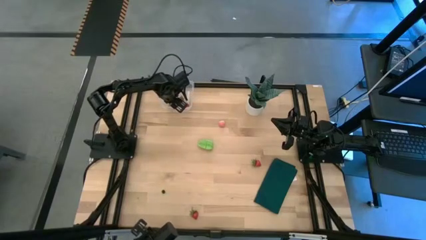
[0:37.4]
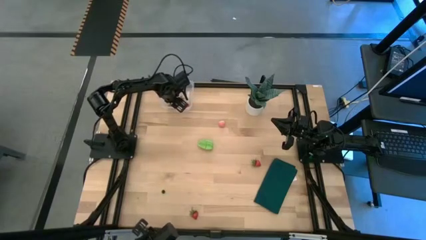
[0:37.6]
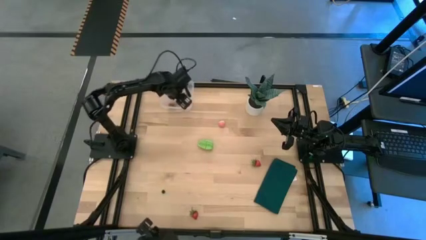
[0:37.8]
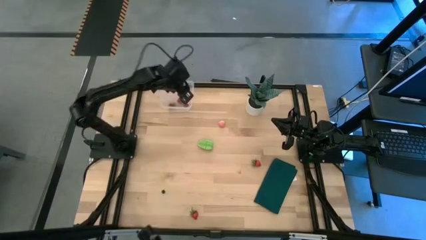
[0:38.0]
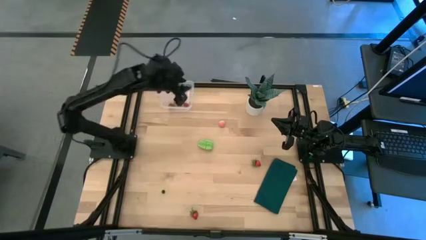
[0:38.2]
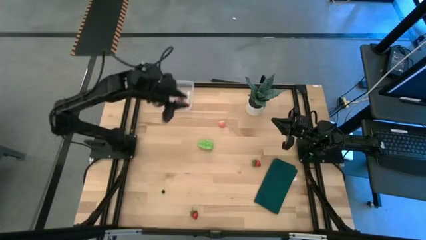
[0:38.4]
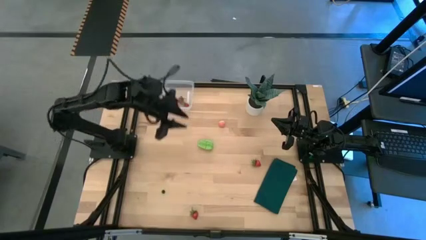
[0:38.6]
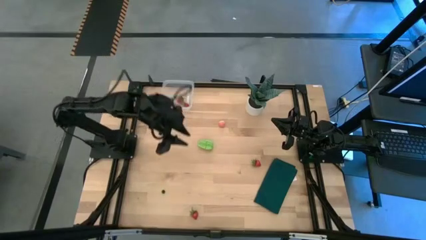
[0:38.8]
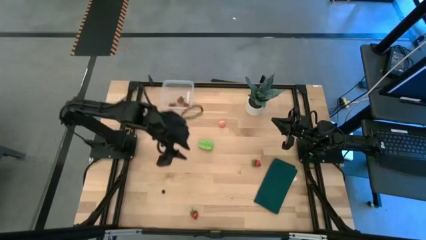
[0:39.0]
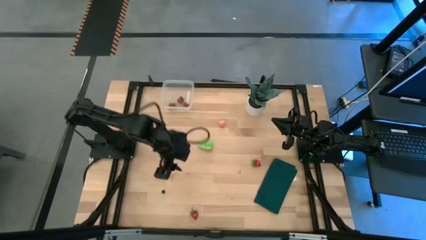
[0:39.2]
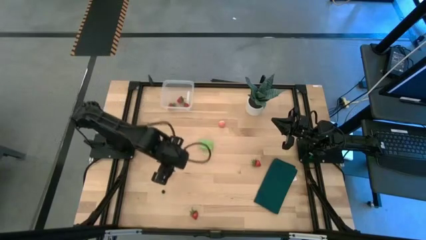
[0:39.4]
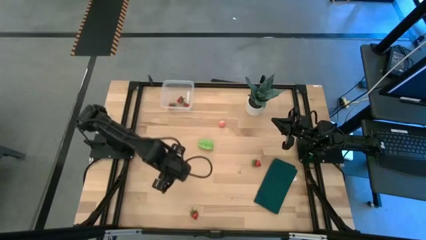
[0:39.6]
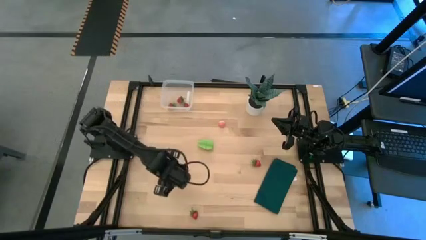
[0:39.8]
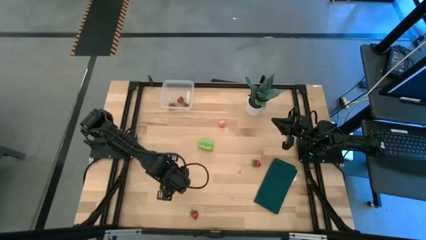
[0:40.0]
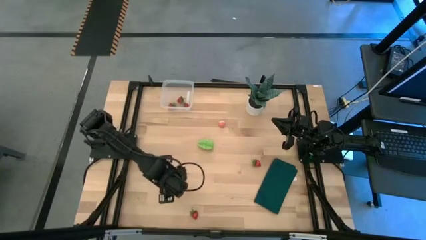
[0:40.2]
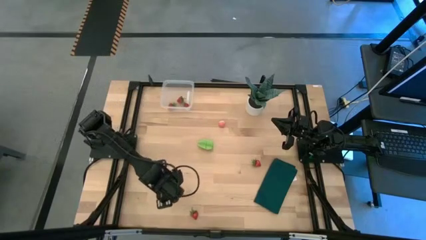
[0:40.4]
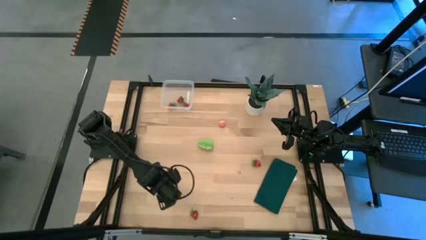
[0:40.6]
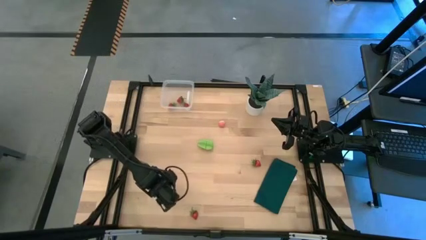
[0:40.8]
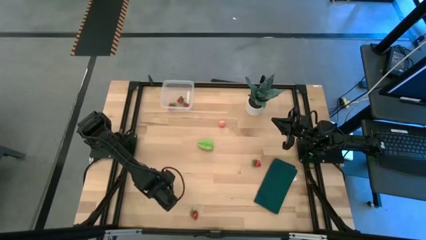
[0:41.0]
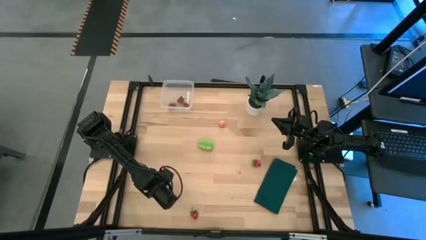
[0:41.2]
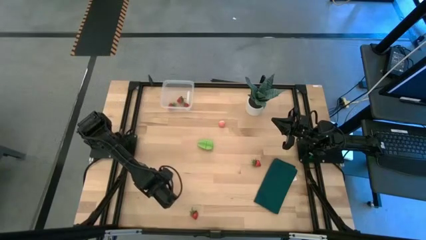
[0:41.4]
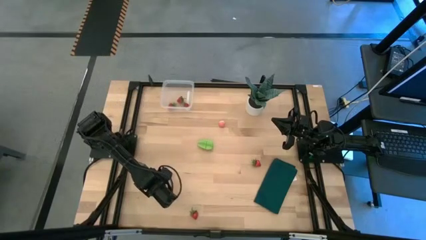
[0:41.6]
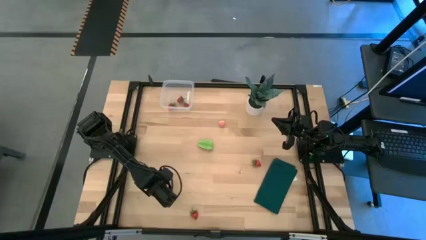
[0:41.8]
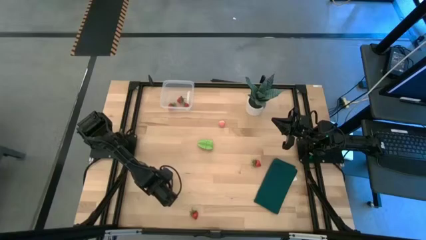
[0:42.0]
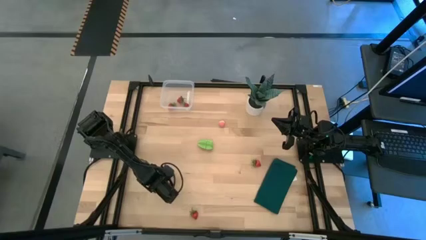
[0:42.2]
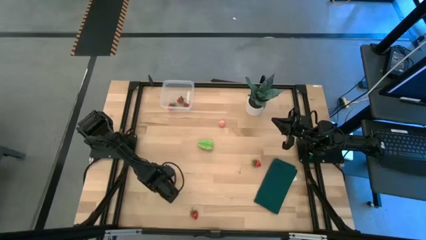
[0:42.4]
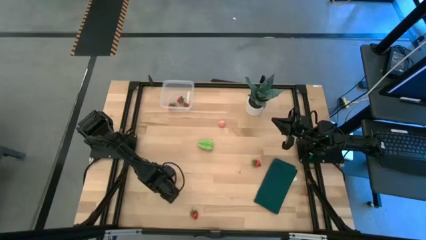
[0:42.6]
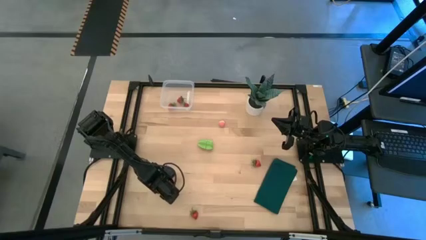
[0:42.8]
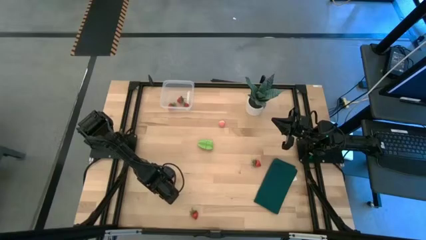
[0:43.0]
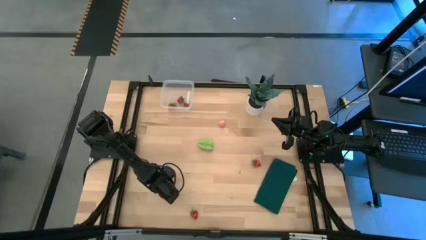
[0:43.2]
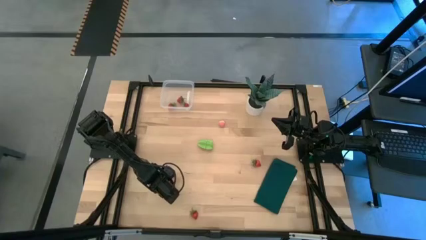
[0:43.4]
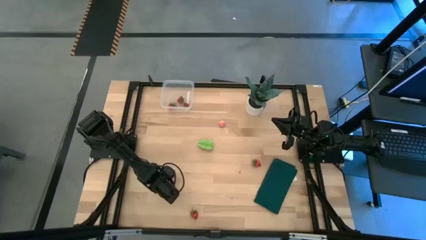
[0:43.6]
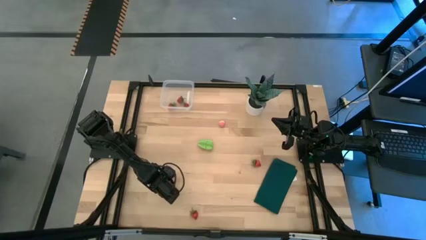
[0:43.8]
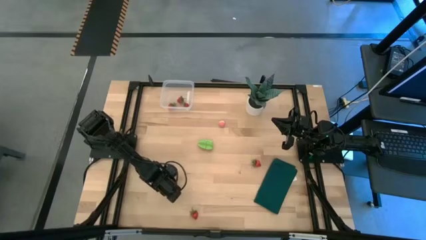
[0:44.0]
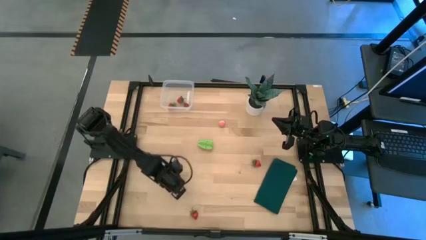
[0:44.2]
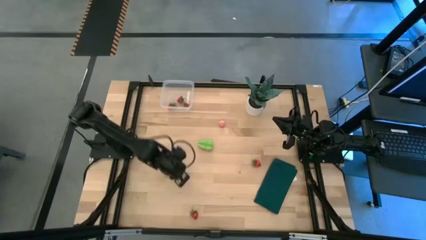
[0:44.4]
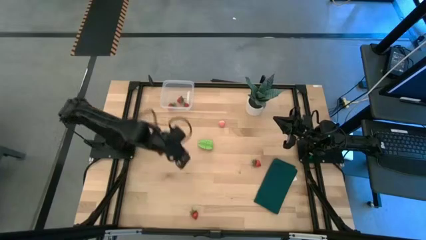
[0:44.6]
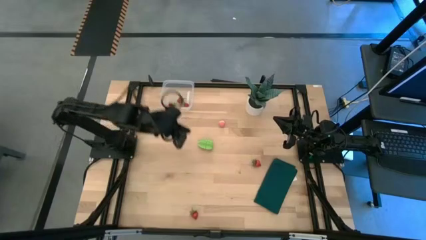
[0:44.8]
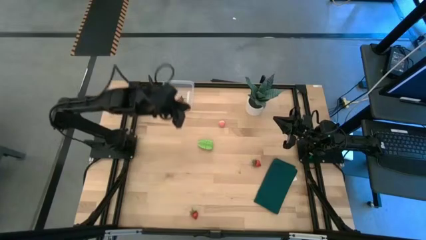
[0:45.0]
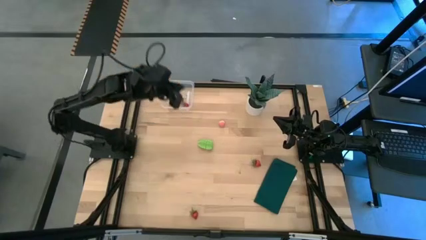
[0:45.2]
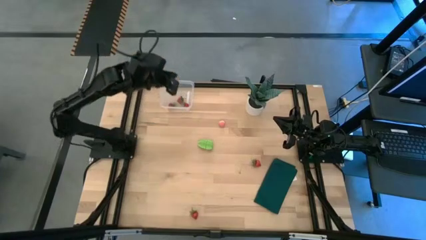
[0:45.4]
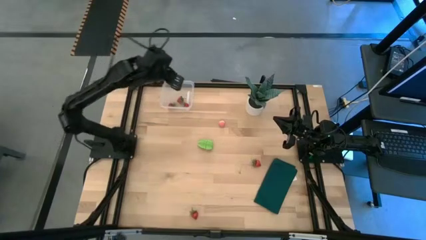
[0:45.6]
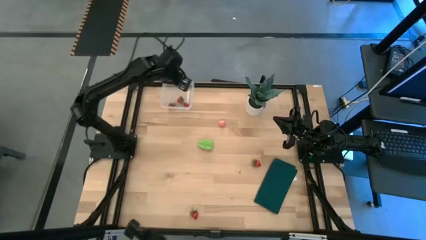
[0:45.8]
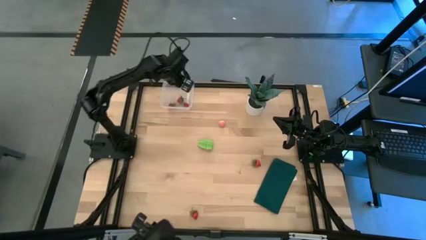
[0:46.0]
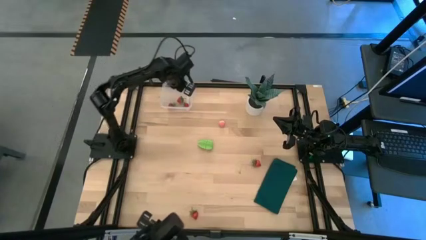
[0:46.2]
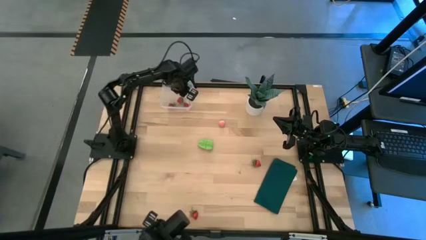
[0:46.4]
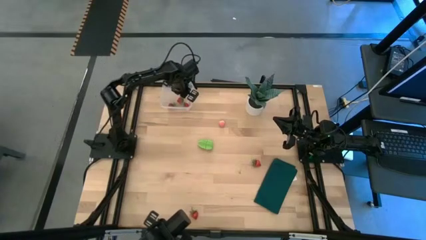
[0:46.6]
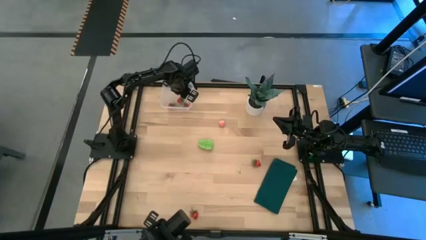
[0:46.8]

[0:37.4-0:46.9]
Task: Pick and placing Produce into tupperware
Put the blueberry into the transparent container

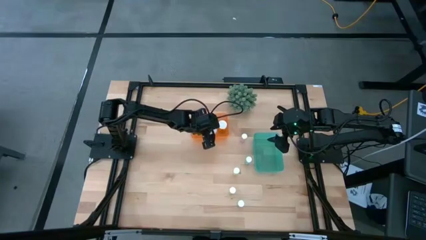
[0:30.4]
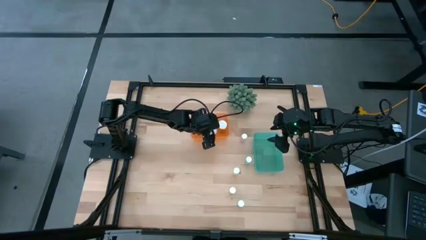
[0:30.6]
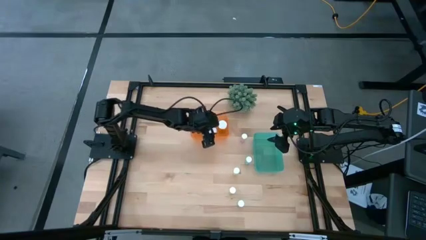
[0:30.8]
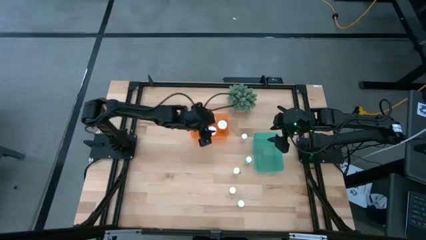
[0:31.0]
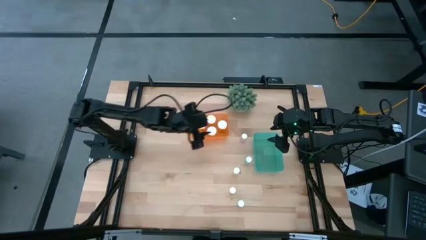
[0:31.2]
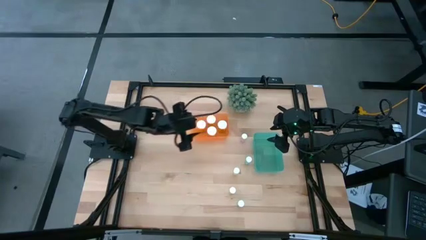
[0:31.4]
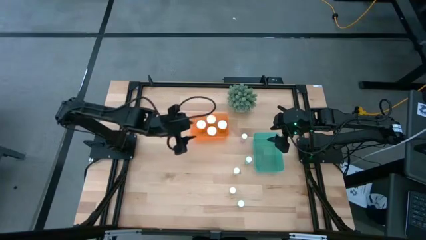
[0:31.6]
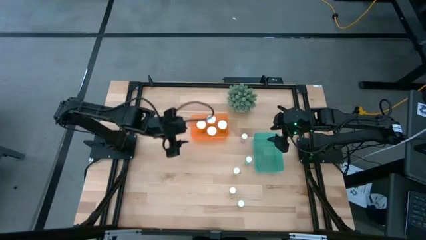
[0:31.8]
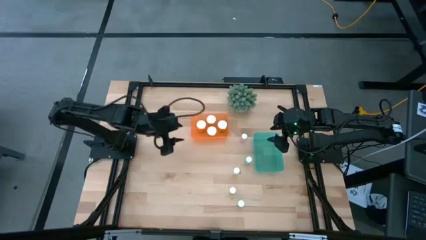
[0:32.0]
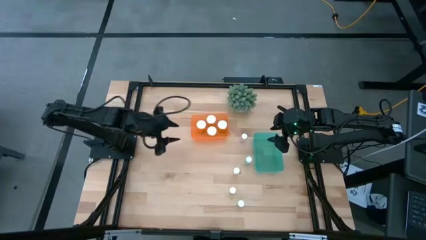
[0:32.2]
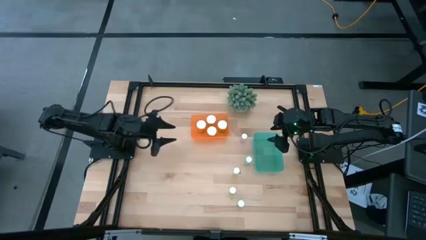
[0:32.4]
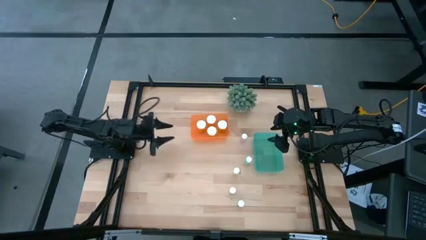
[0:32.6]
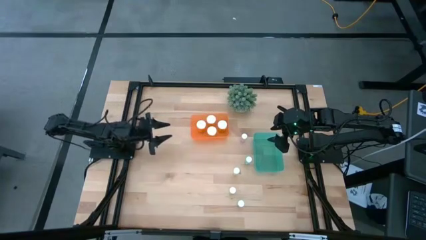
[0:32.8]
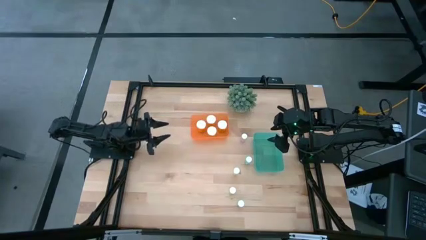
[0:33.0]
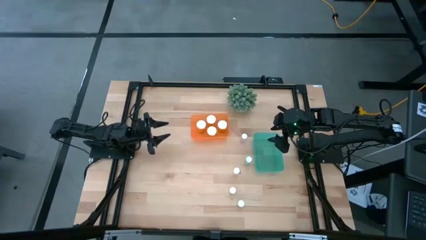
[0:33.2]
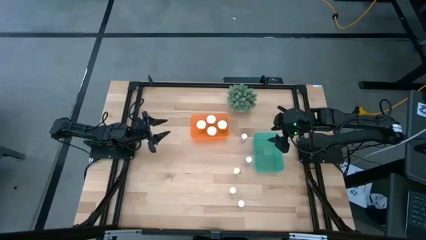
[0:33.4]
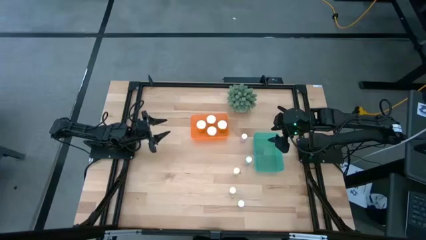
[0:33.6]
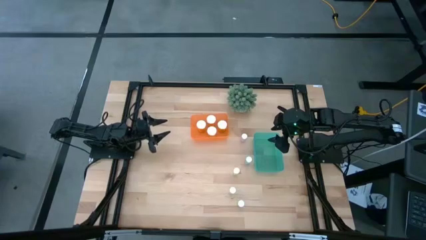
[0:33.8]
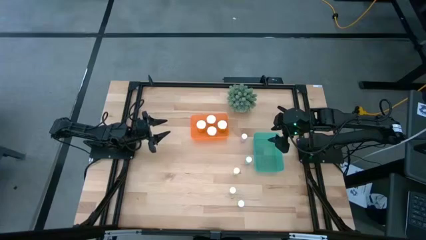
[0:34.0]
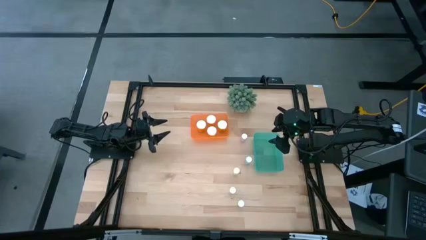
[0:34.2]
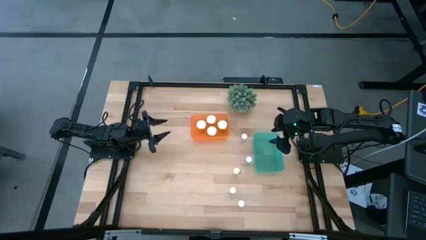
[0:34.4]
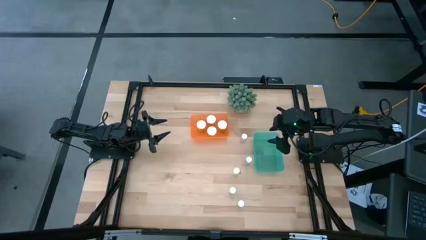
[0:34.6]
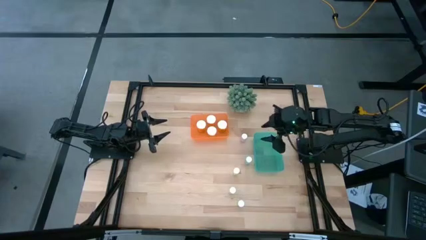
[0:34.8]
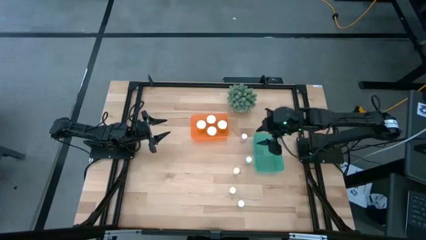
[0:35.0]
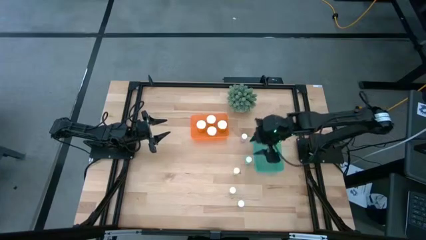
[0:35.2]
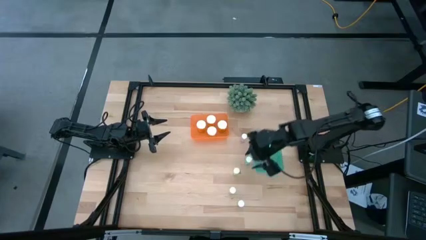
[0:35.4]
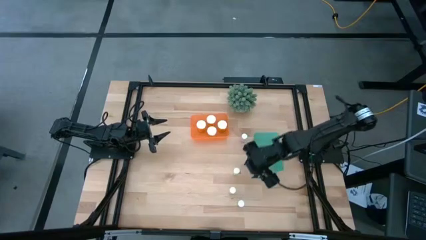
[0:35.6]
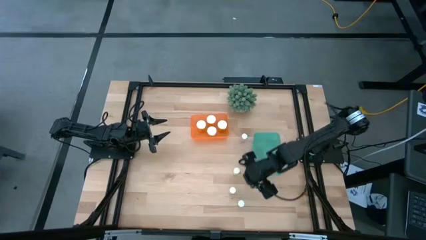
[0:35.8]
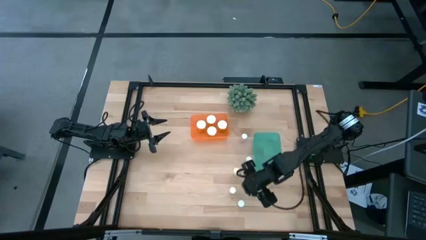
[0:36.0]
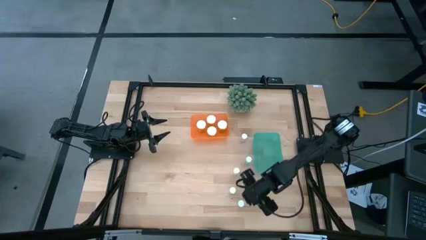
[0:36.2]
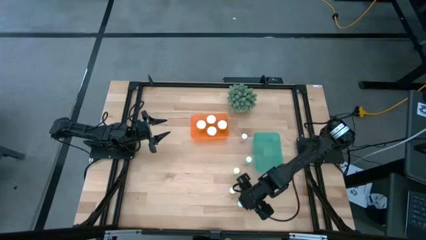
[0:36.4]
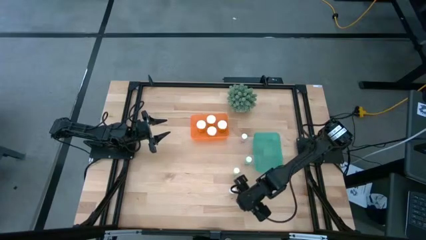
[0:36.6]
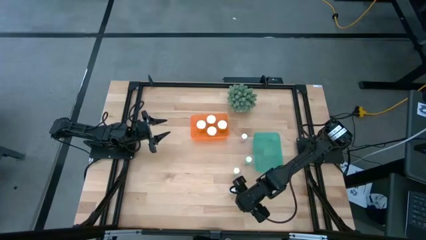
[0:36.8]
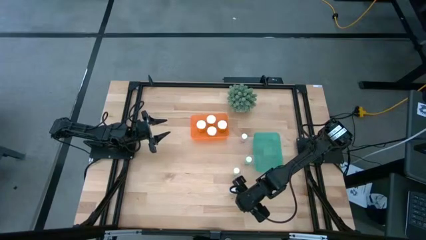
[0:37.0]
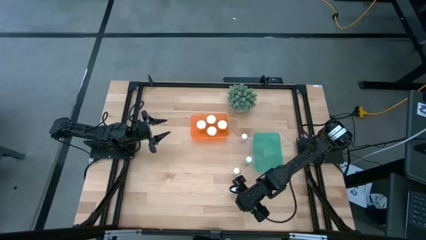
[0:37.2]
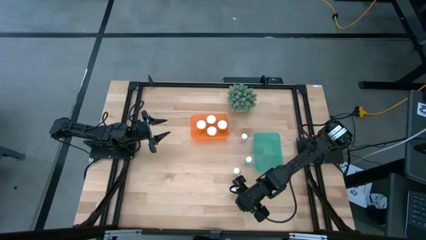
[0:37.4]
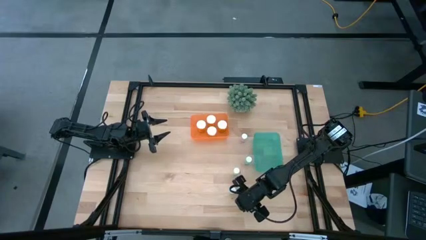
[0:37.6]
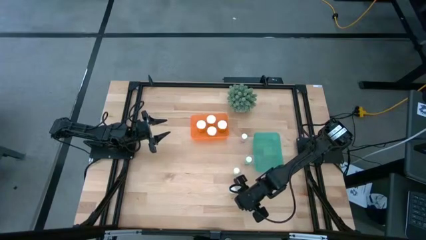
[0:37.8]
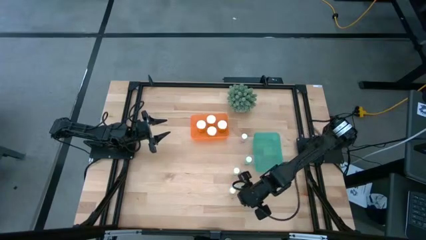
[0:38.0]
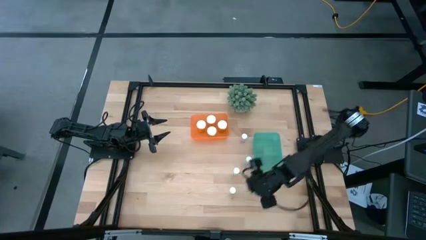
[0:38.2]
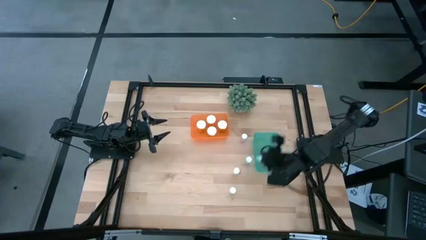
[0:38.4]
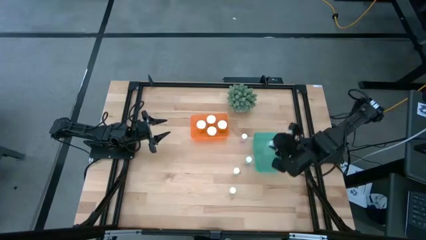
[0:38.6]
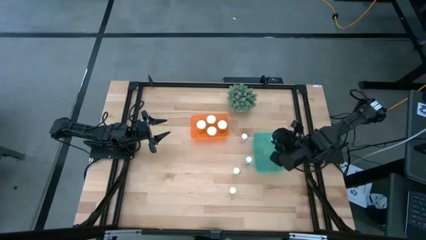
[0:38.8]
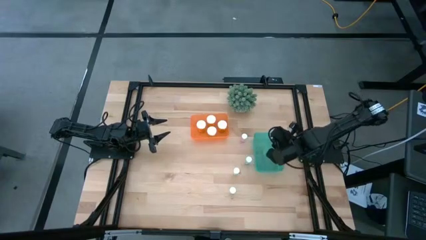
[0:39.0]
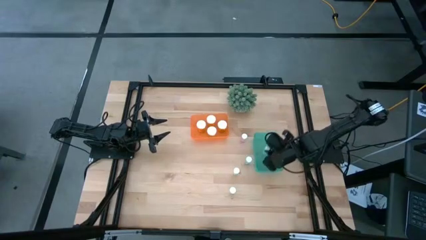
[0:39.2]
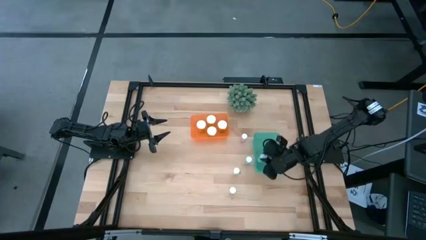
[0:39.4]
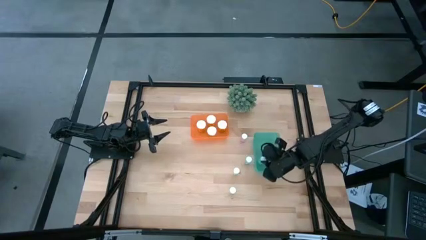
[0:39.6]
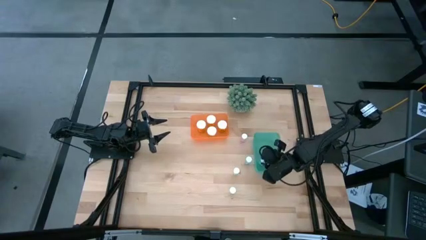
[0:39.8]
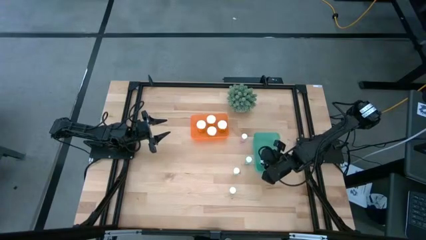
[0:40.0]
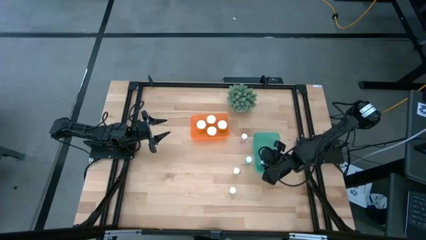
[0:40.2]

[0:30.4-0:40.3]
Task: Pick and place medicine bottles into bin by pill shape (circle, oval)
Put the blue pill bottle into the blue bin
